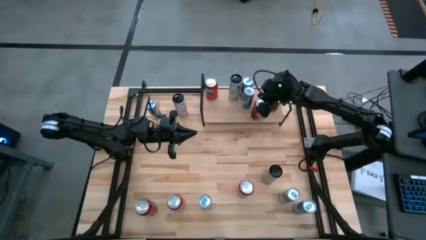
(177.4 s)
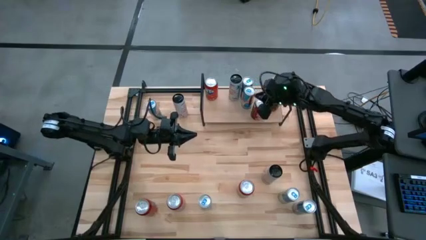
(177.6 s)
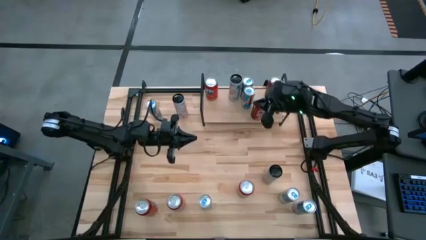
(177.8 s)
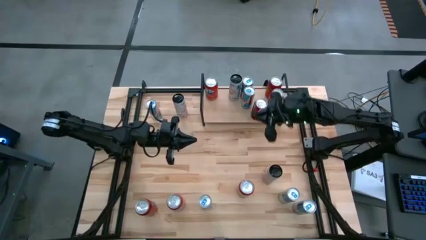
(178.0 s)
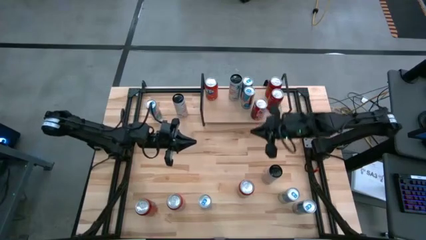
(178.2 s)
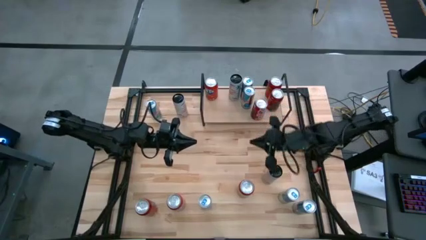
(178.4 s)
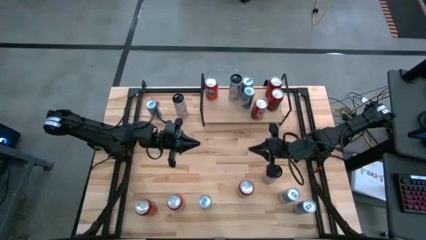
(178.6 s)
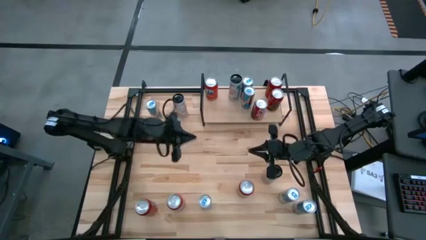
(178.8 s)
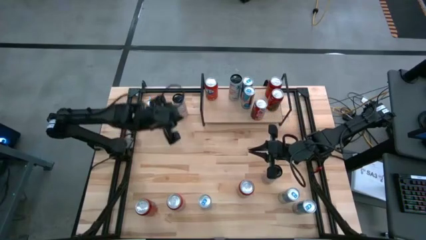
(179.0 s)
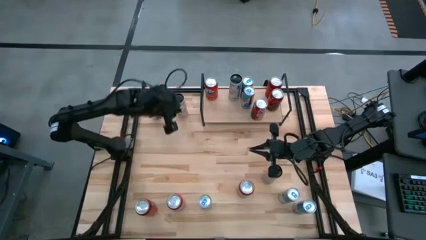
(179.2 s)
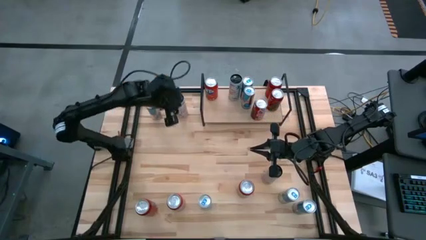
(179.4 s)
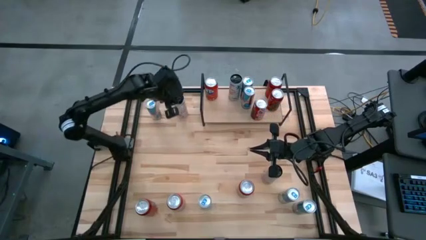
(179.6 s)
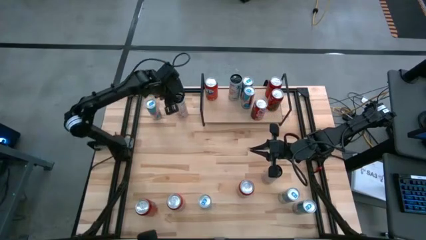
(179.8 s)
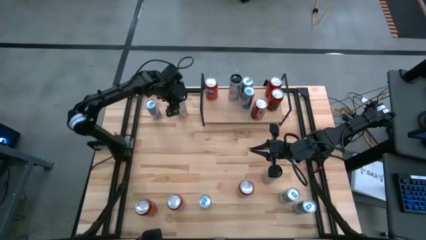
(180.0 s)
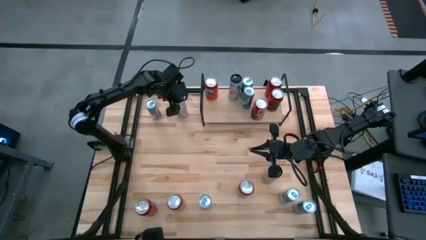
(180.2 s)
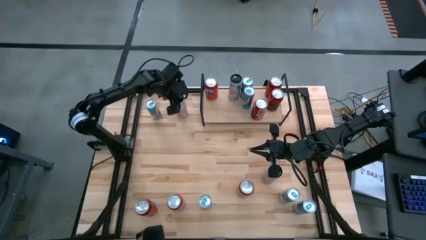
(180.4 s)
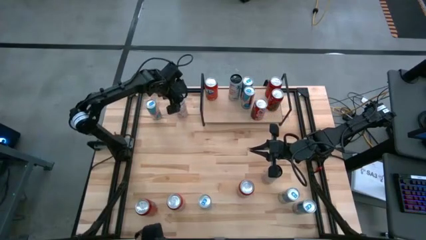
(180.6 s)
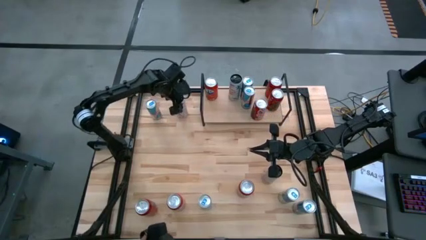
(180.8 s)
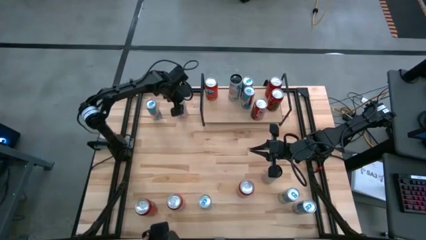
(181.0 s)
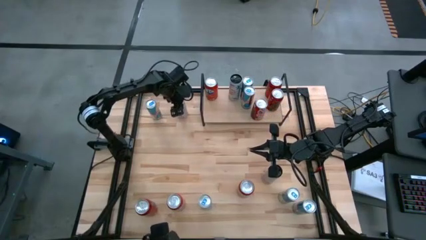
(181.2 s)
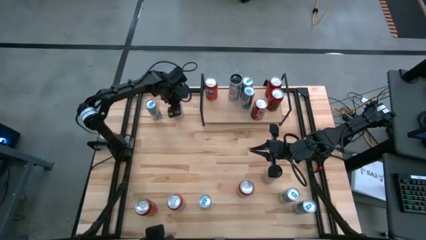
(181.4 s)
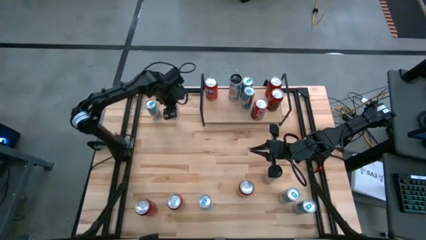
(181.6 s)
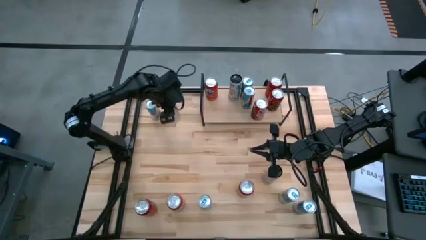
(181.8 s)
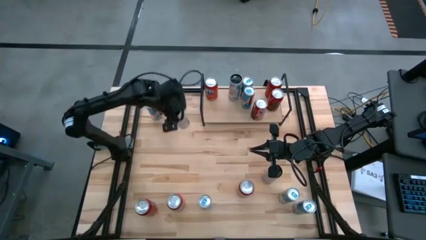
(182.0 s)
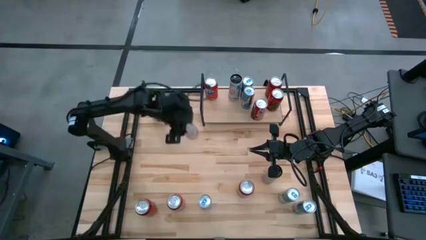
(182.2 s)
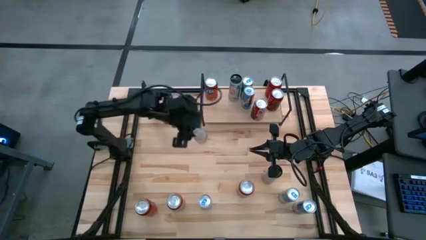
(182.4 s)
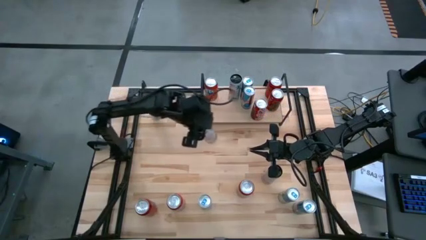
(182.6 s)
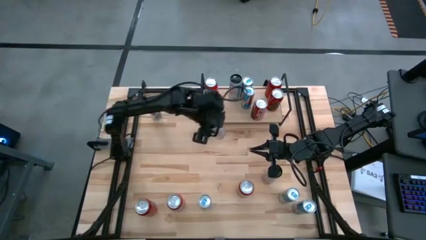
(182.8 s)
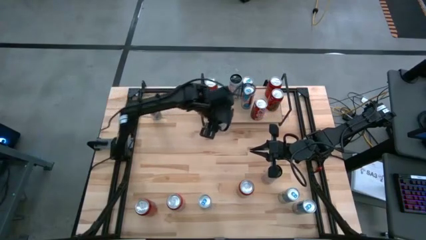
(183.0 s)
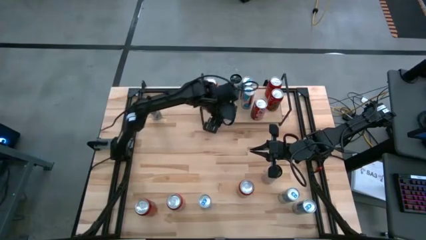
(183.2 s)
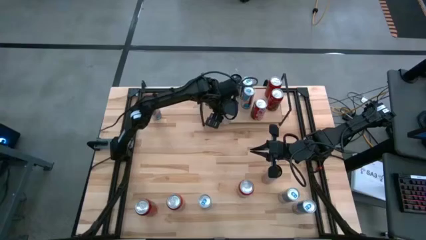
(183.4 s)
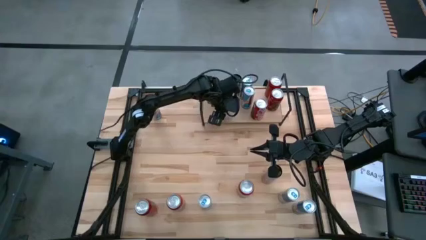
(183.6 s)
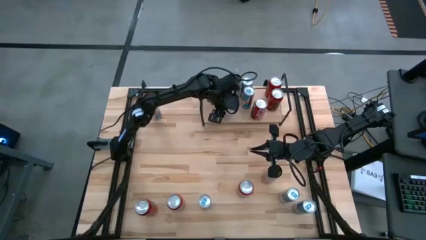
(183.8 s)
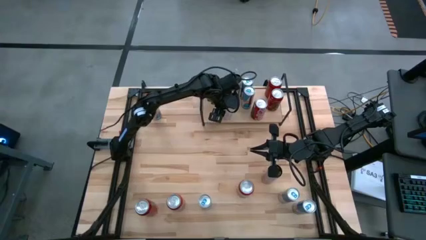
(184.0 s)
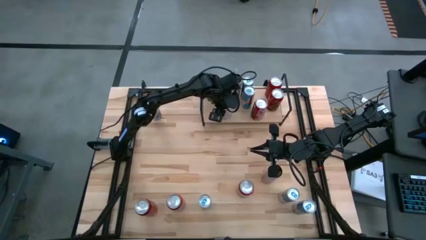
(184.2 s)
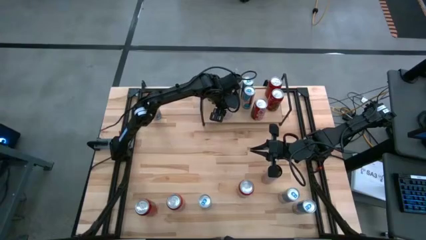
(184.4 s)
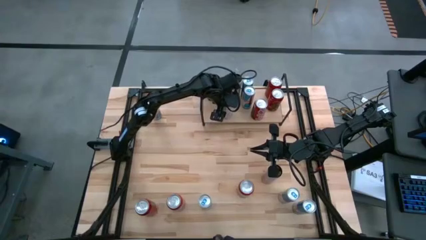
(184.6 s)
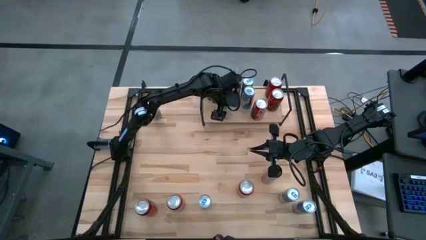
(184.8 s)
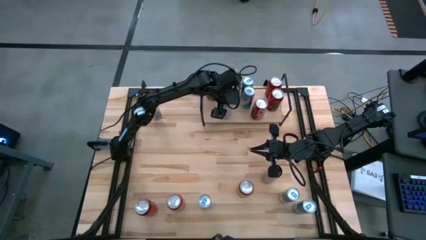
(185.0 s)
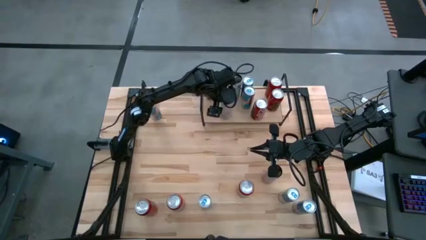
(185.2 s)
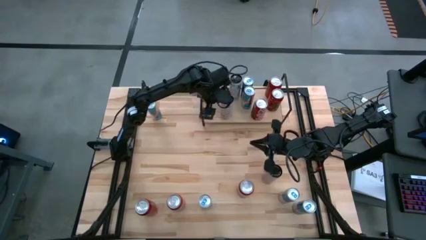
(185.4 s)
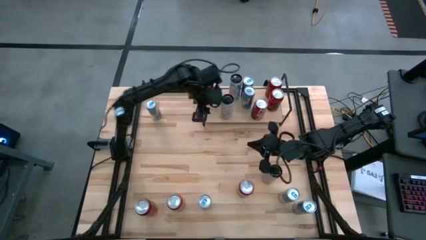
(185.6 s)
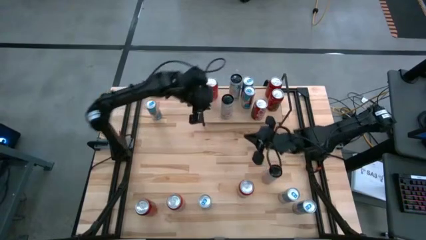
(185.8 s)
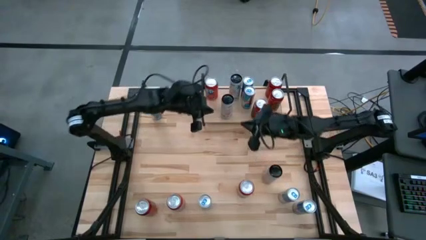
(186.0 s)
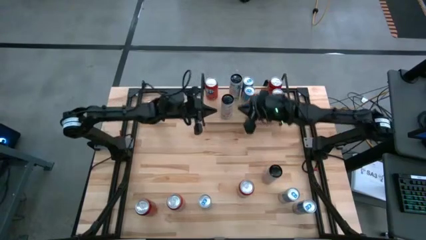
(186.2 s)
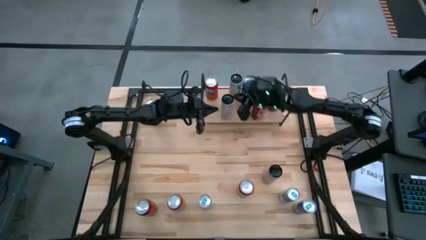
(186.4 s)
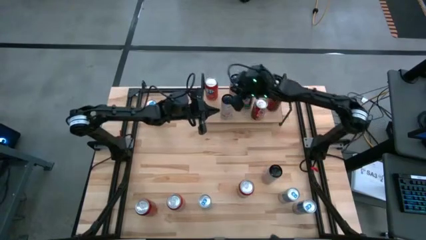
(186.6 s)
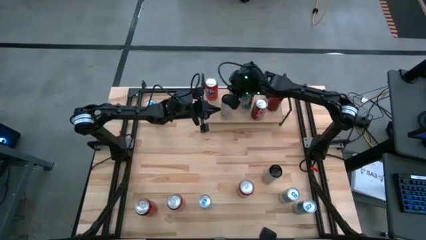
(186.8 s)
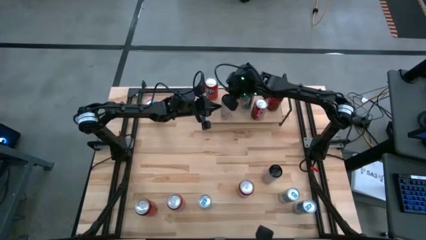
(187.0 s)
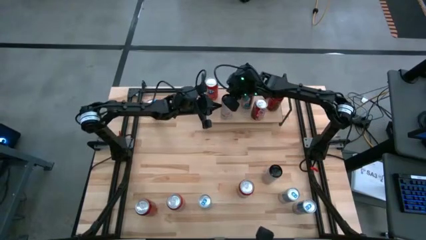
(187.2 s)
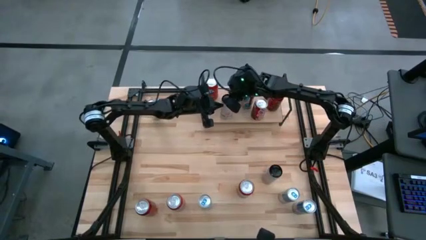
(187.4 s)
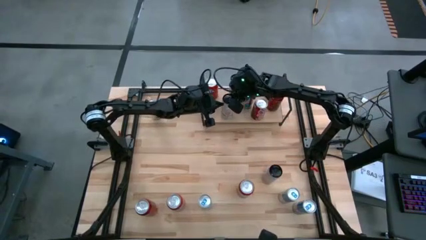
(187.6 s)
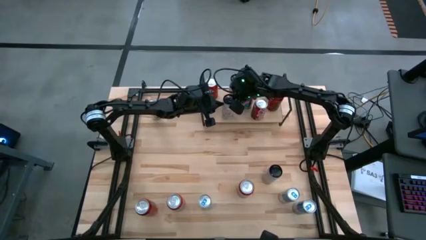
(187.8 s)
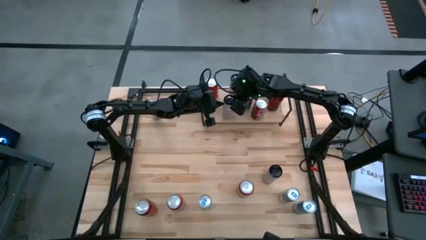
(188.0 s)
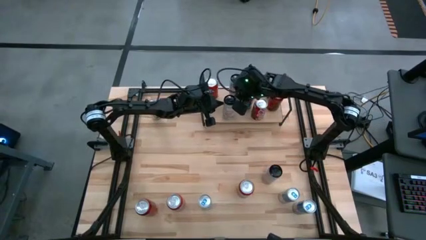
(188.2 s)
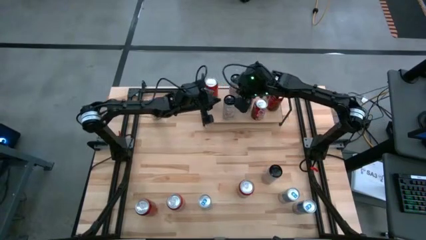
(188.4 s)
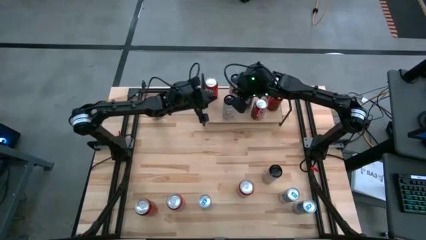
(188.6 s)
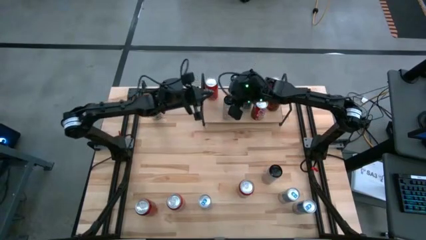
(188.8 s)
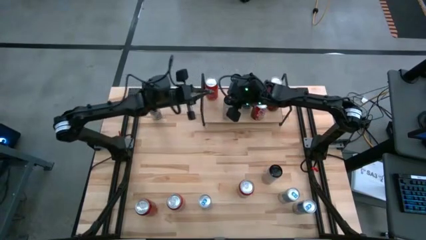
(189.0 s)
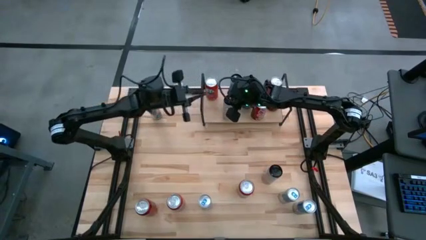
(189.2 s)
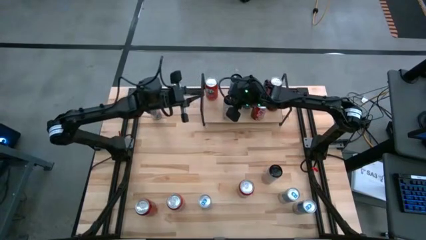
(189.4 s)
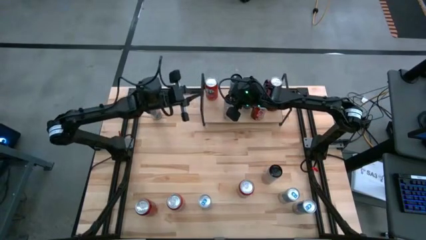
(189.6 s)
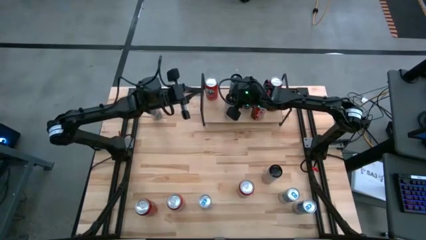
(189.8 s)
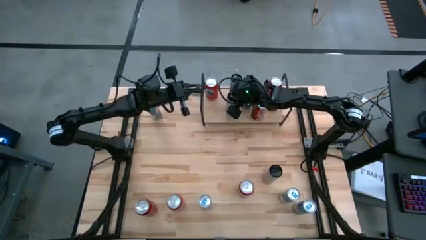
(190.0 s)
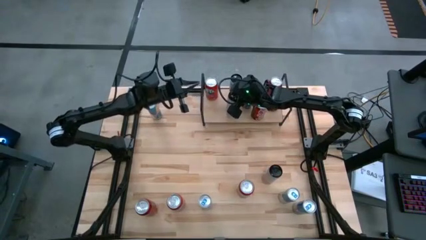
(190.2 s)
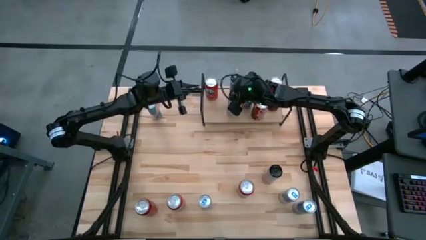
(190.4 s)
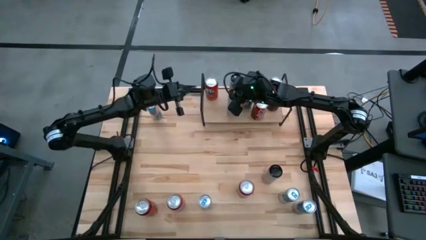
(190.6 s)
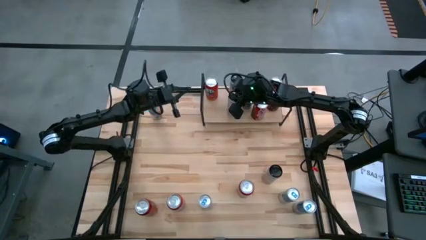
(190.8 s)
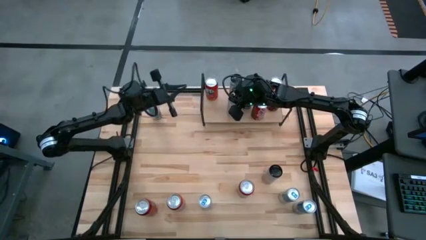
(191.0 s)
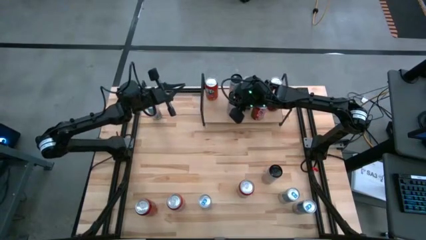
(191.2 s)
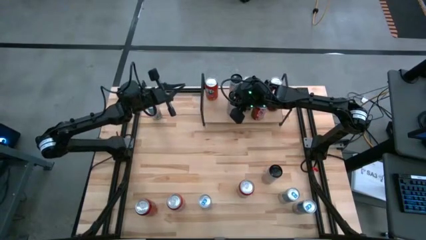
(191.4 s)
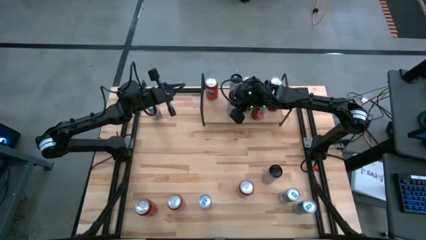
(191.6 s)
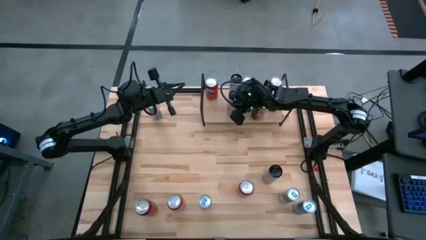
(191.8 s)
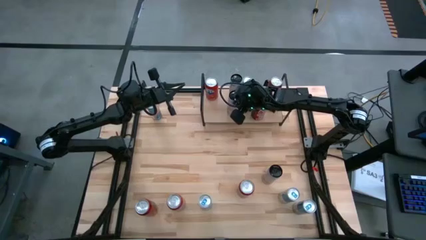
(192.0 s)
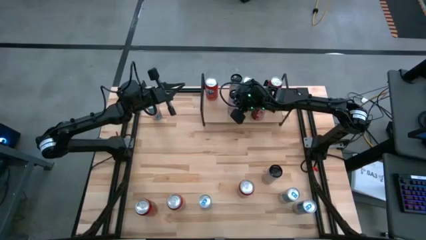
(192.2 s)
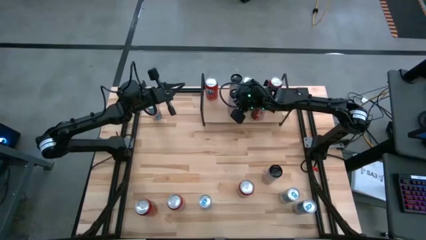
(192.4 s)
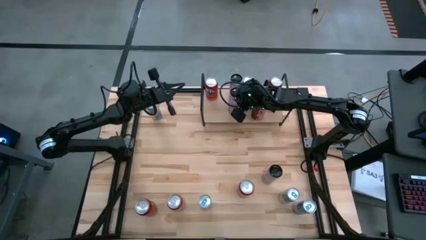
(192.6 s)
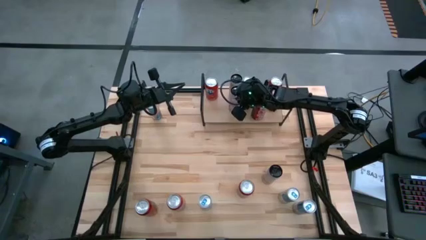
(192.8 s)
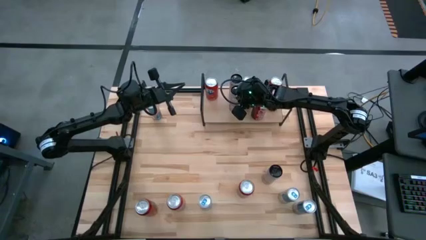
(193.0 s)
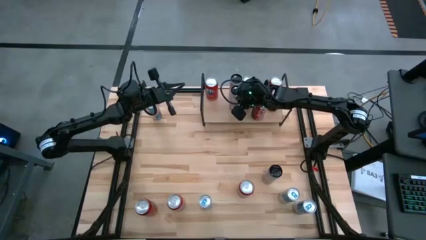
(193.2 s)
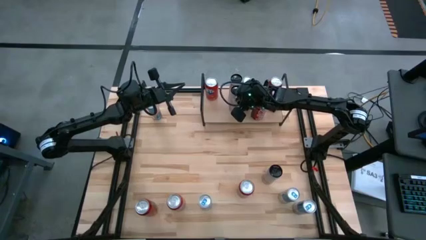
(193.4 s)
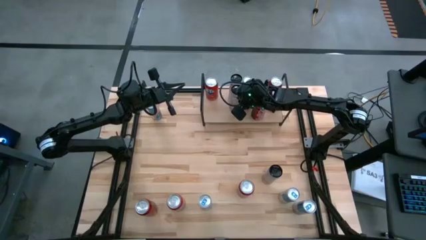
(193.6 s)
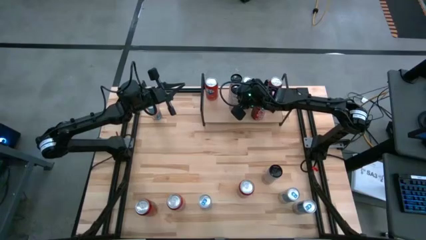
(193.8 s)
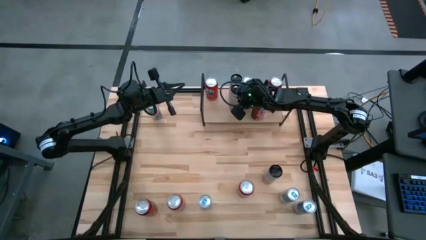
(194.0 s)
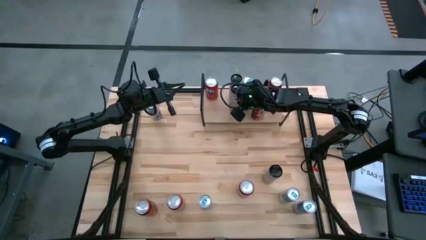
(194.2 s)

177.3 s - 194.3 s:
Task: Place canned beverage on shelf
Put the white soda can on the shelf
